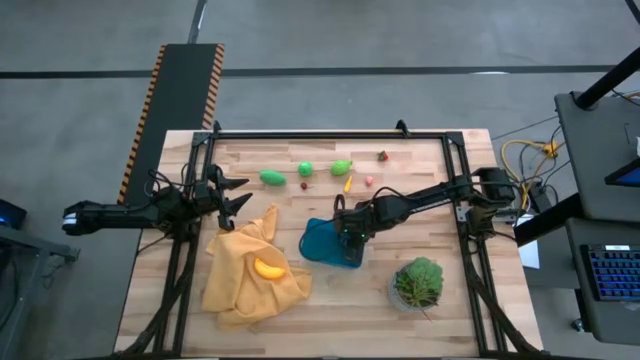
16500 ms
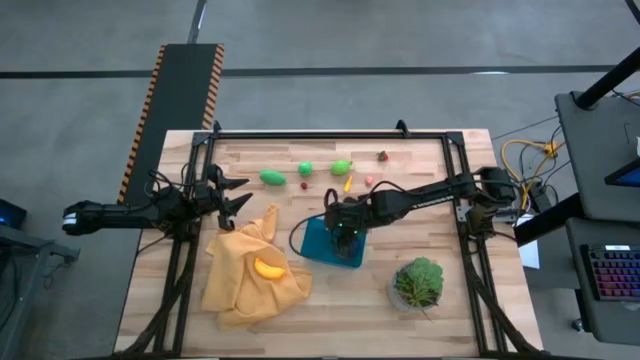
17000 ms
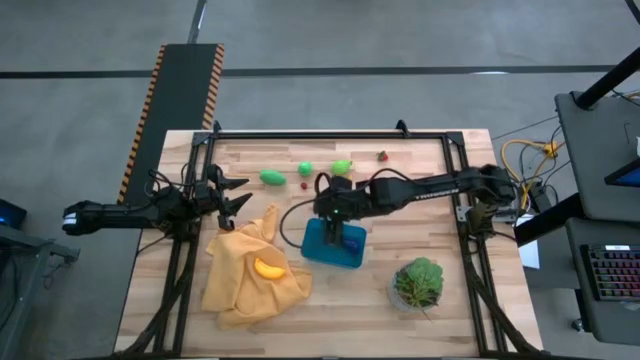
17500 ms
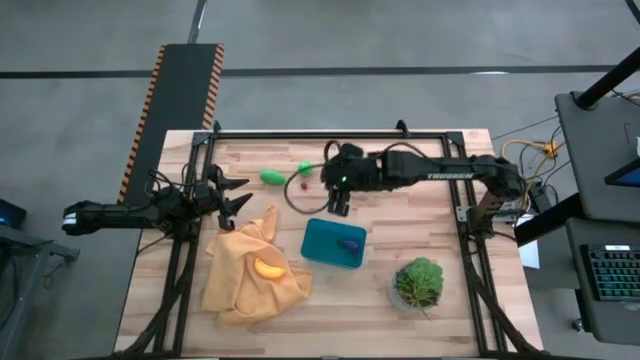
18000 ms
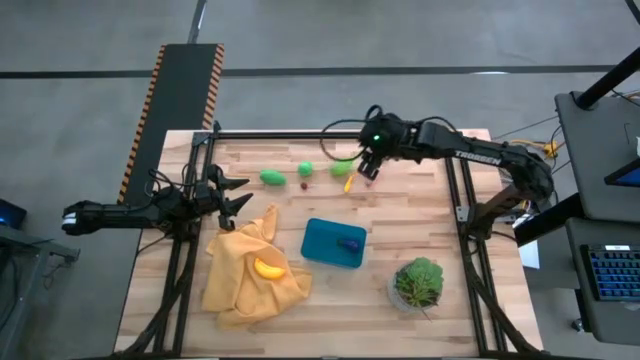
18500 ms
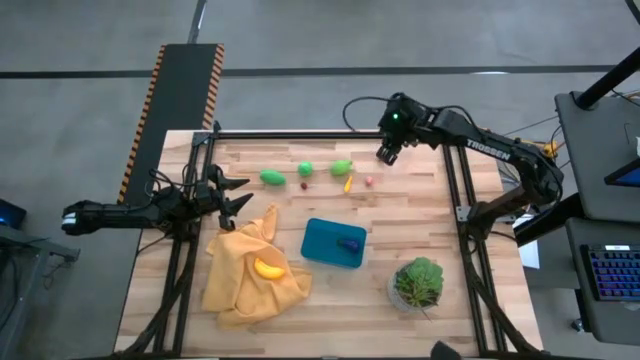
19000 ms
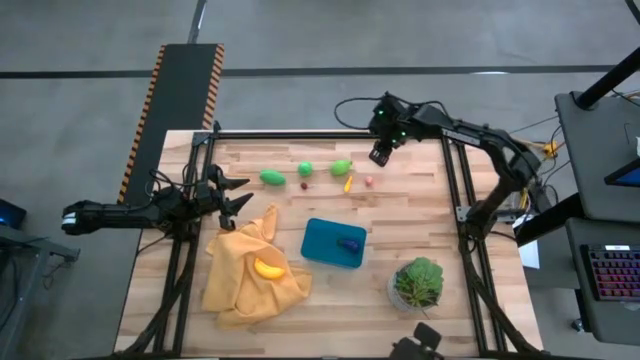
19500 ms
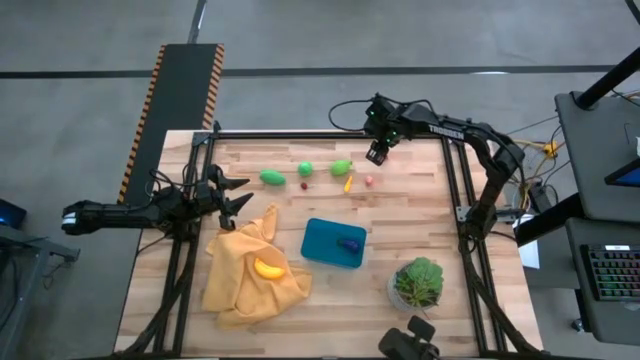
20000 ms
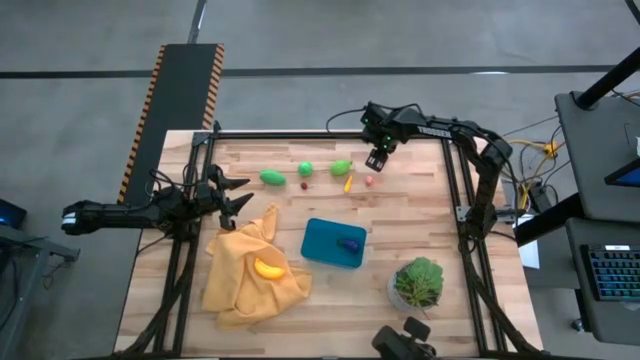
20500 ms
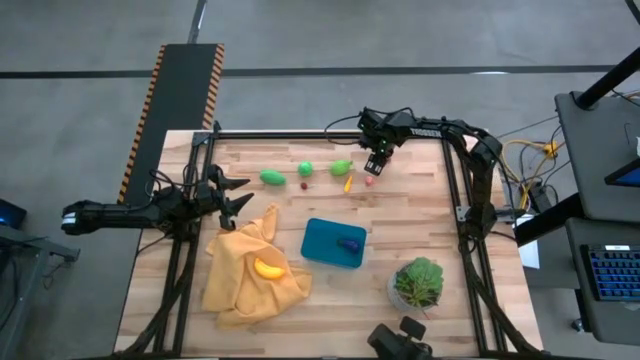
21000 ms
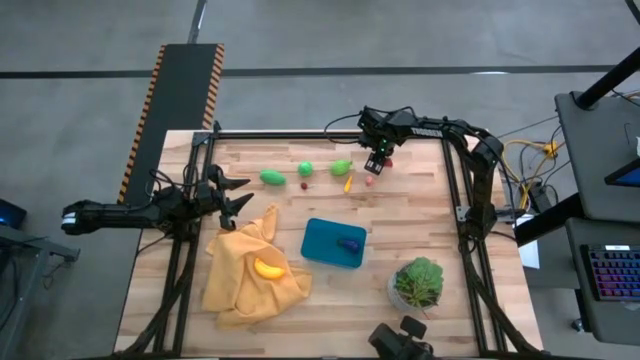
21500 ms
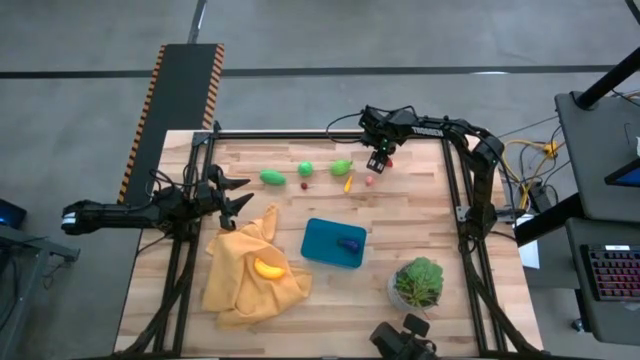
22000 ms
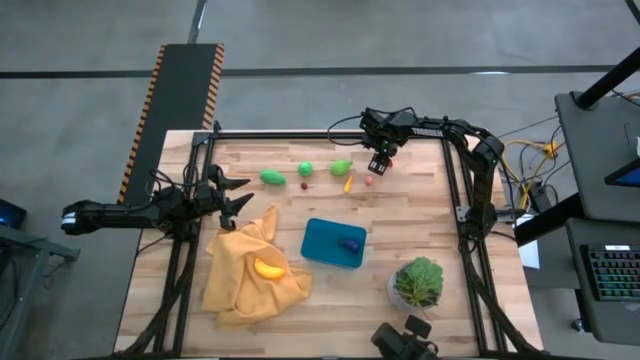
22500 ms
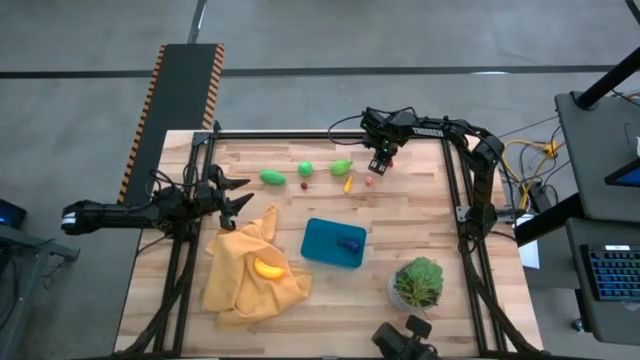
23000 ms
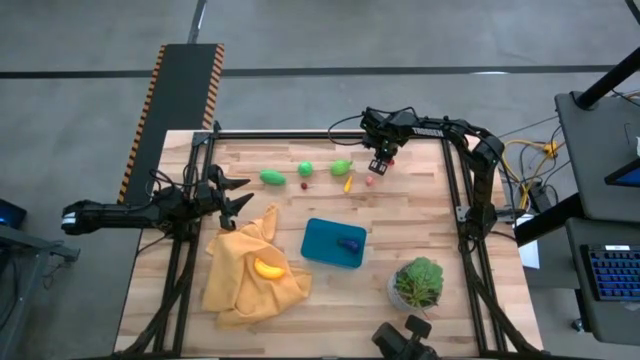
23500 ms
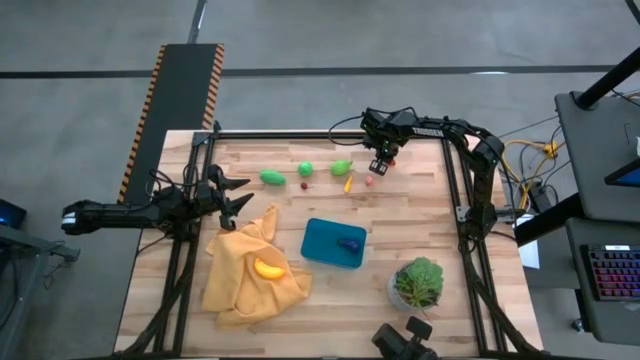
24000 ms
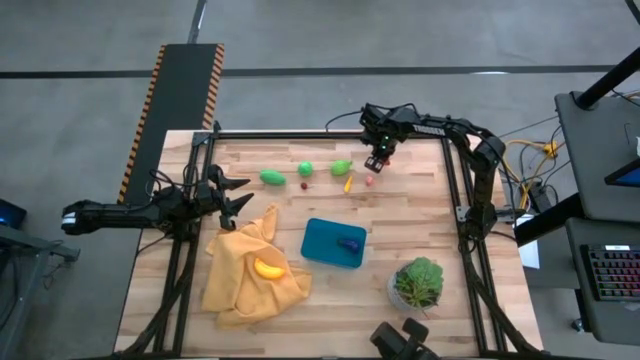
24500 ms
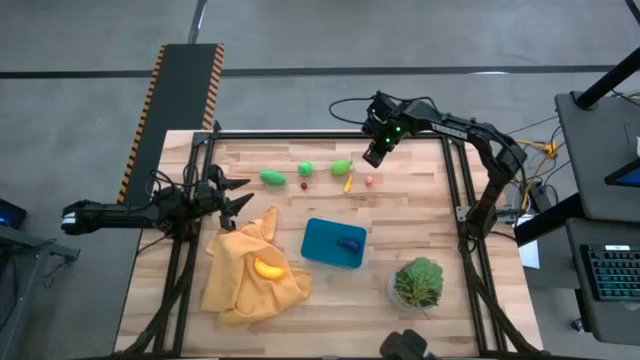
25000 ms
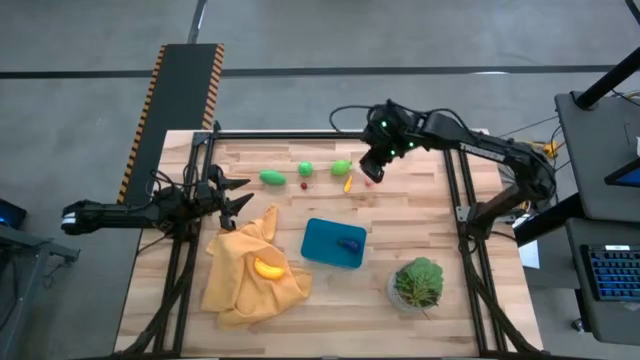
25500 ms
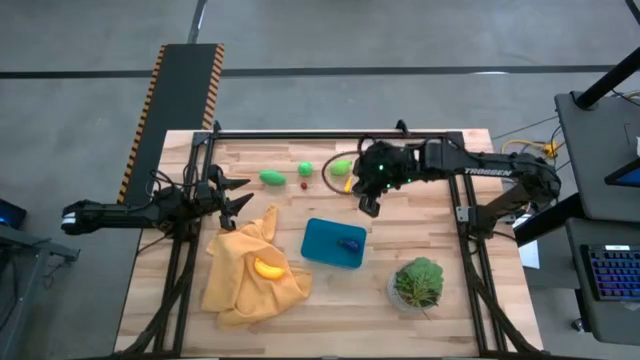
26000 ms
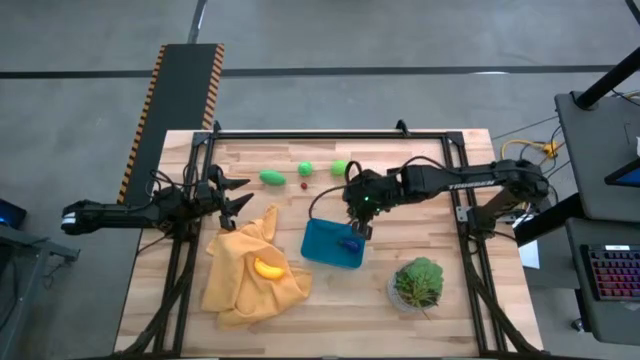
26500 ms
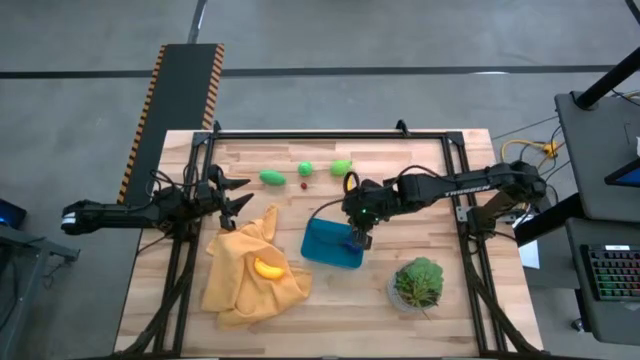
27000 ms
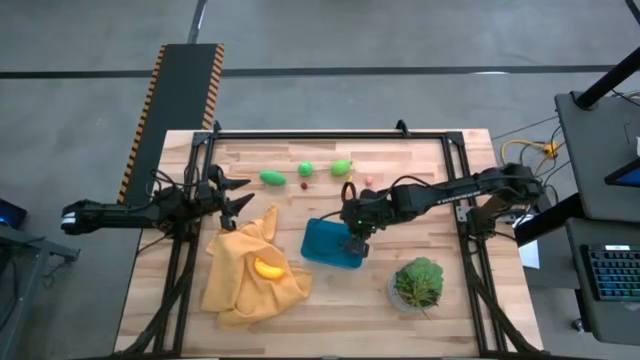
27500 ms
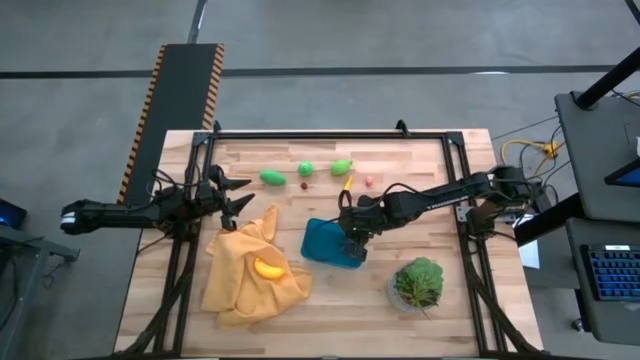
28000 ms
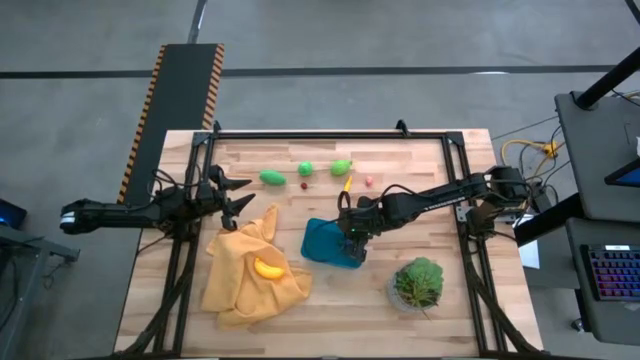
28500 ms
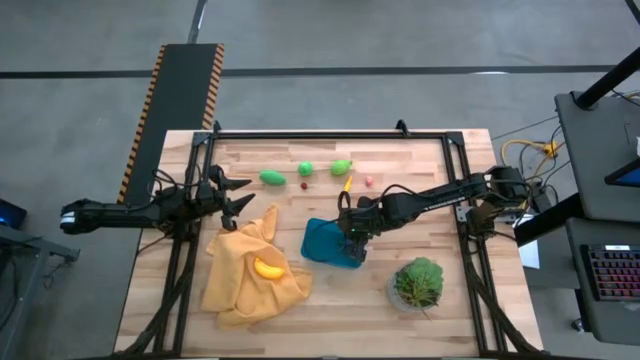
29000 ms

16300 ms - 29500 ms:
Task: Pick and placing Produce into tupperware
Put the strawberry into the blue bin

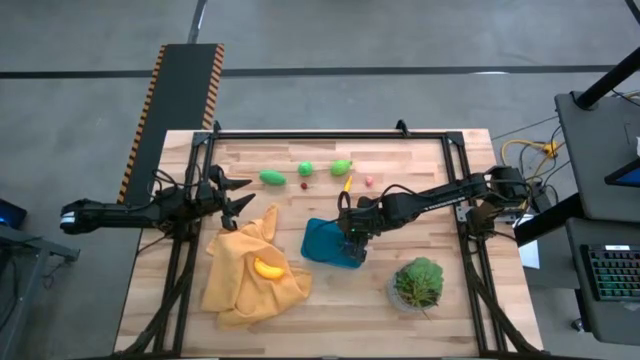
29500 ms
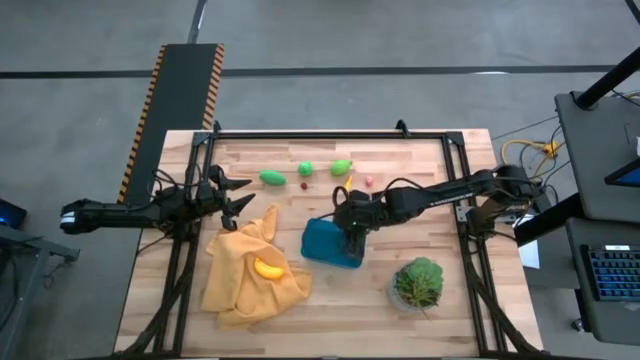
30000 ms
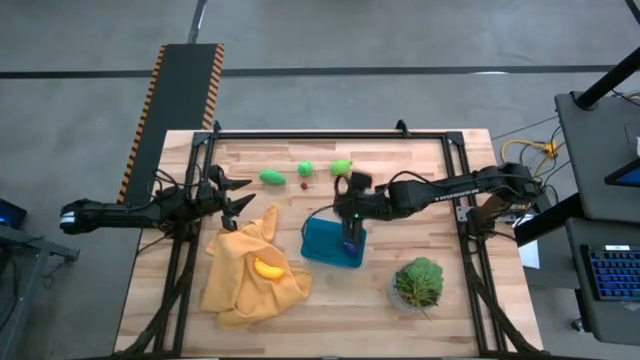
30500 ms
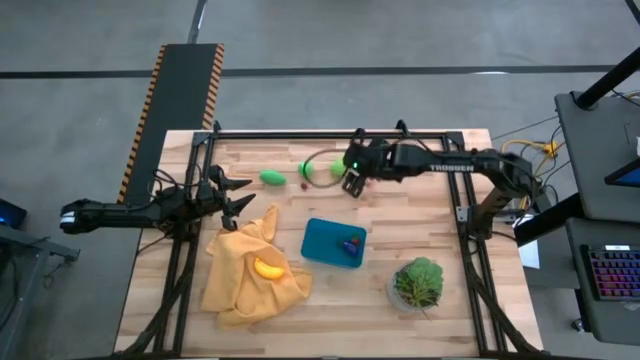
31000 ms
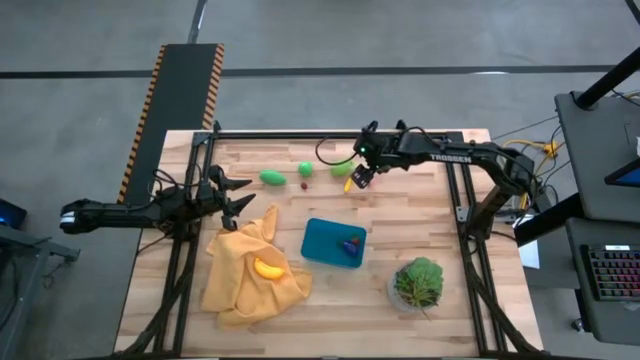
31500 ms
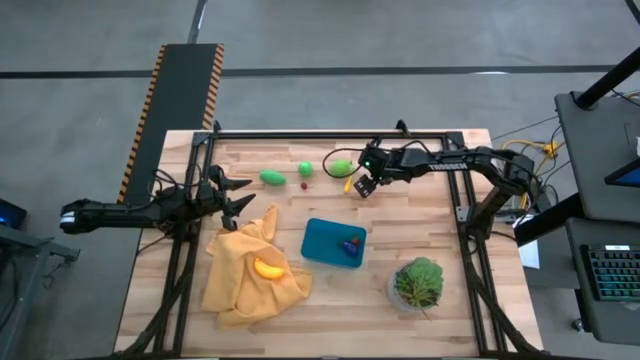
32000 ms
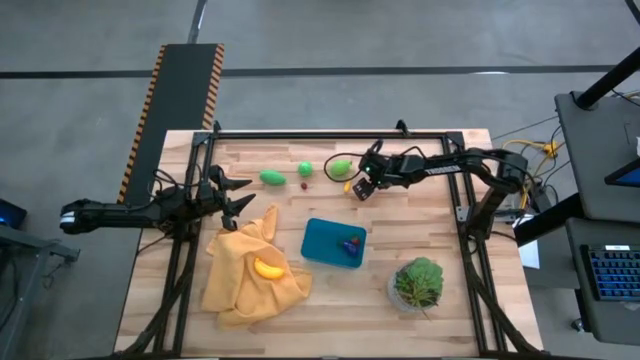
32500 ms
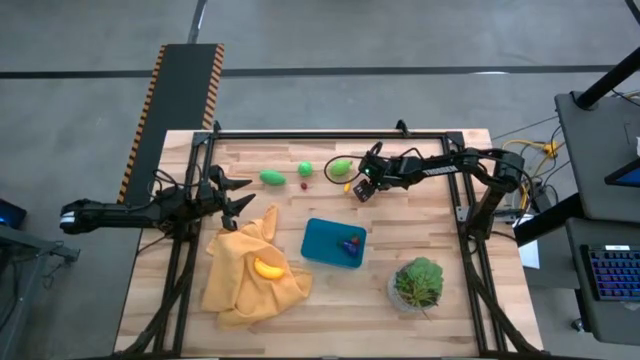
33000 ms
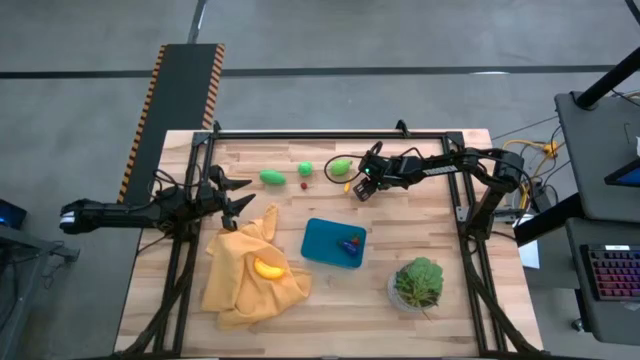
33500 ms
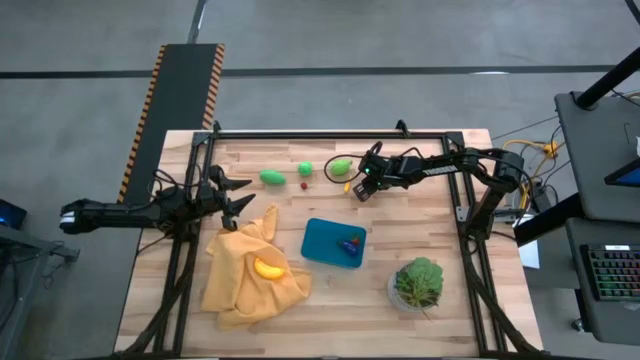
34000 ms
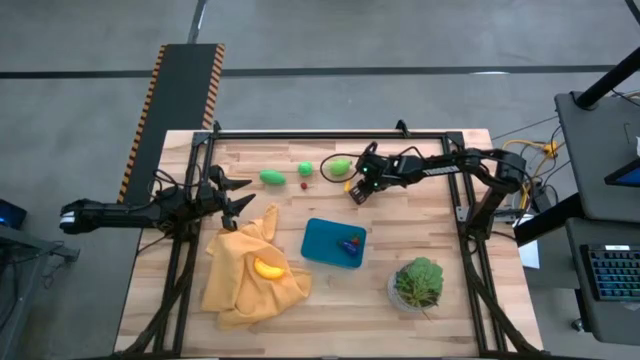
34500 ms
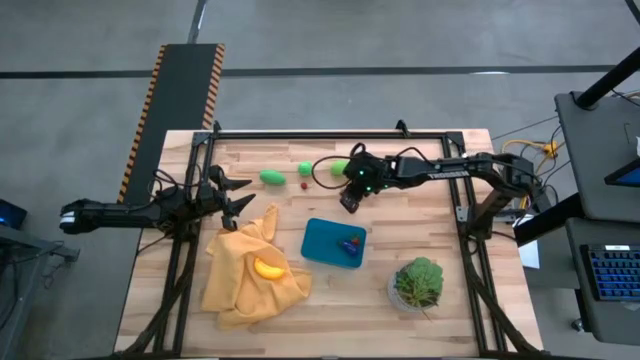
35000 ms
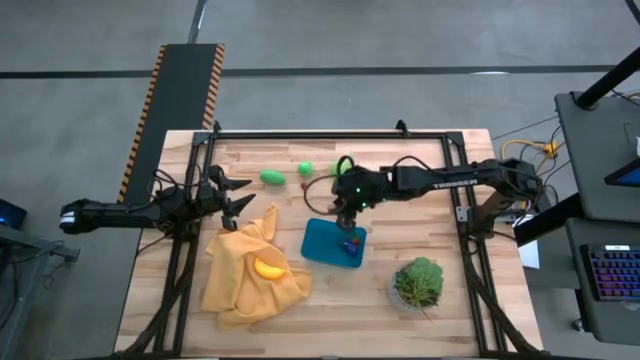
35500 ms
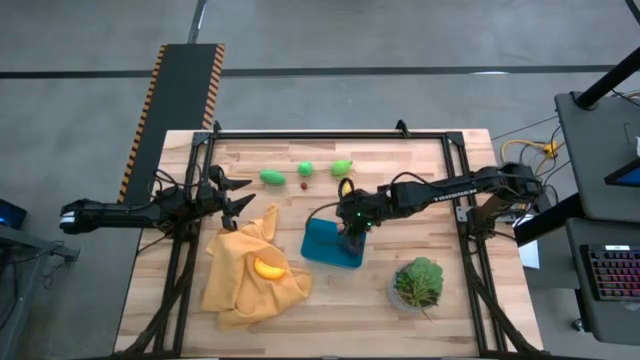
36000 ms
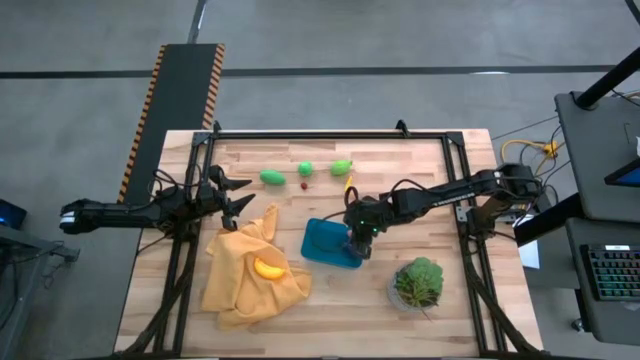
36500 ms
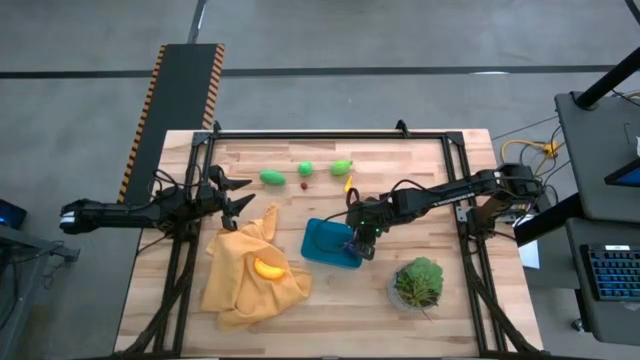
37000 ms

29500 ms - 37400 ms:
Put the apricot into the blue bin
